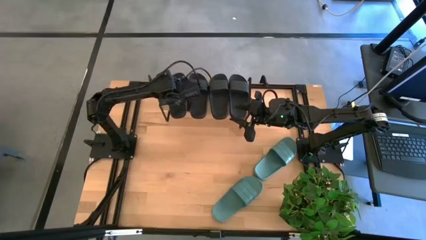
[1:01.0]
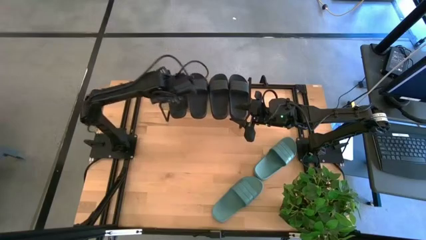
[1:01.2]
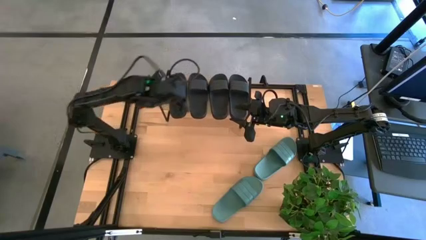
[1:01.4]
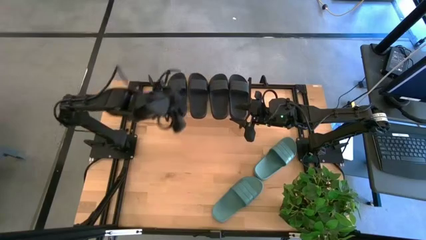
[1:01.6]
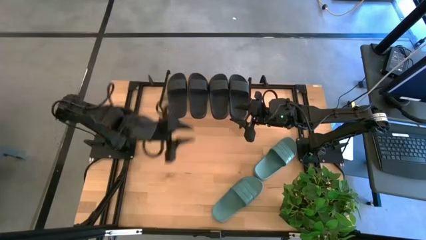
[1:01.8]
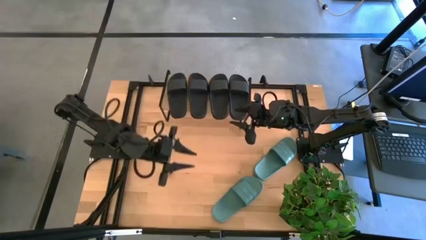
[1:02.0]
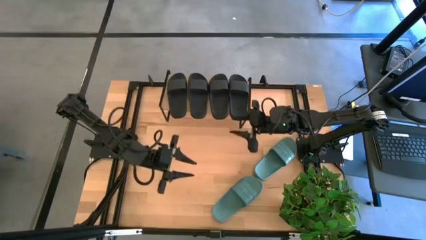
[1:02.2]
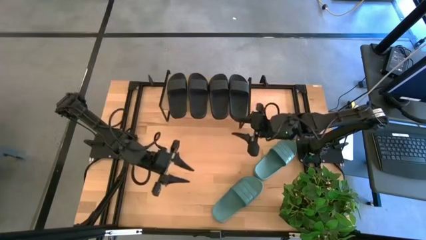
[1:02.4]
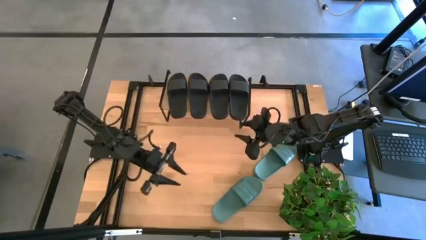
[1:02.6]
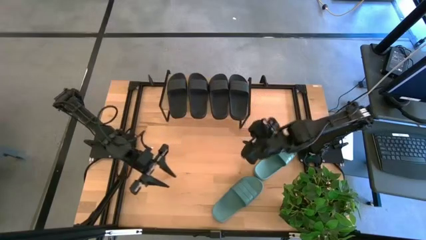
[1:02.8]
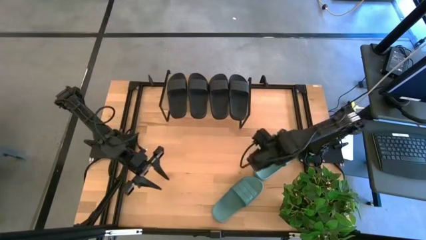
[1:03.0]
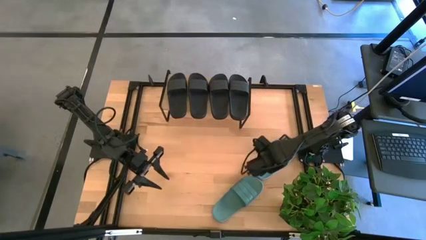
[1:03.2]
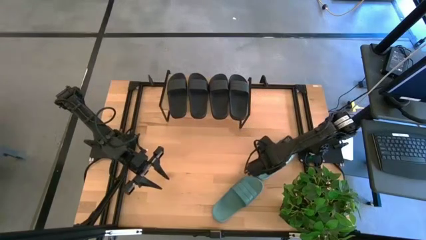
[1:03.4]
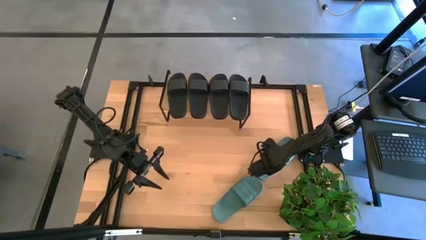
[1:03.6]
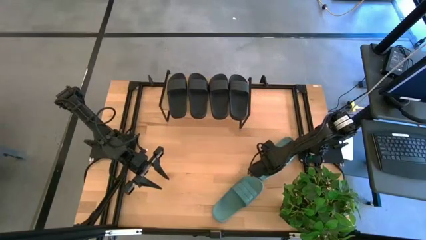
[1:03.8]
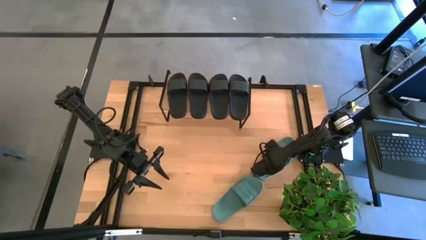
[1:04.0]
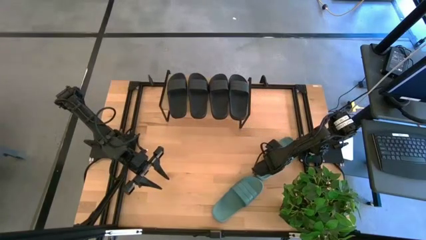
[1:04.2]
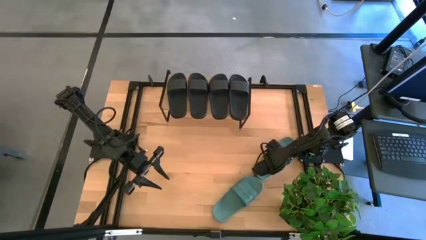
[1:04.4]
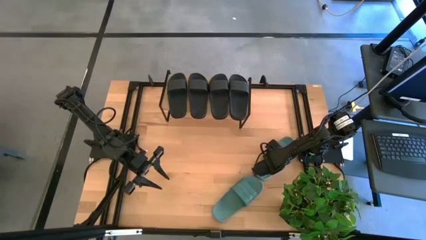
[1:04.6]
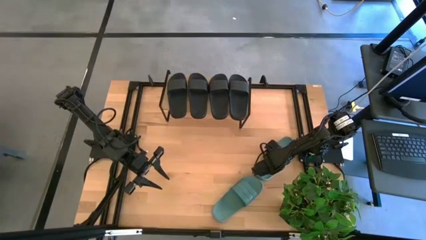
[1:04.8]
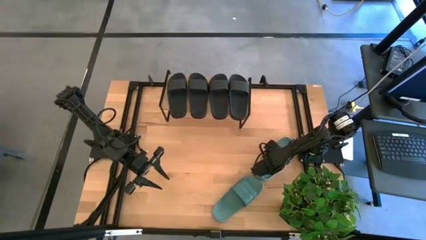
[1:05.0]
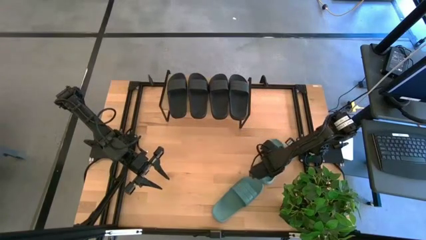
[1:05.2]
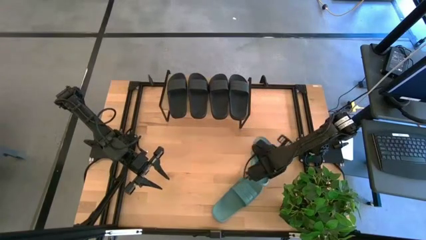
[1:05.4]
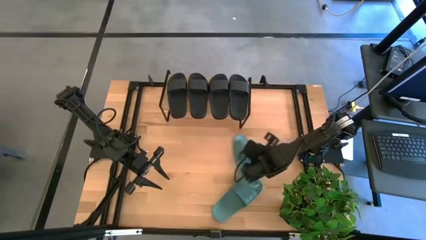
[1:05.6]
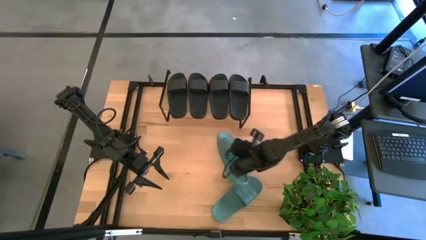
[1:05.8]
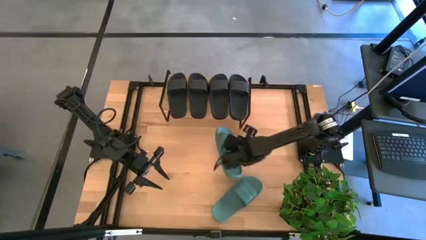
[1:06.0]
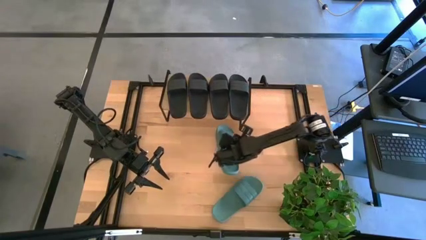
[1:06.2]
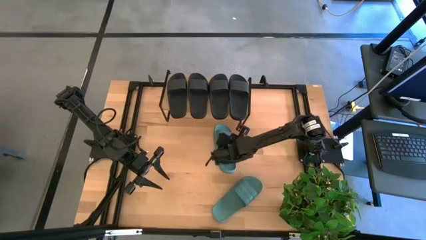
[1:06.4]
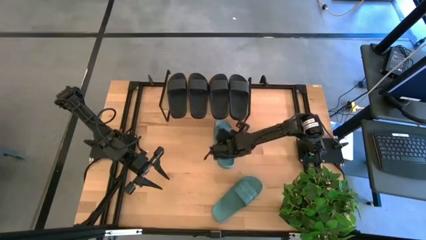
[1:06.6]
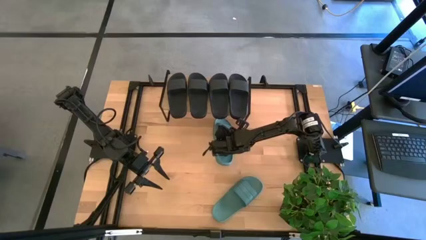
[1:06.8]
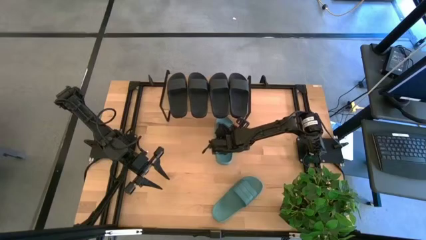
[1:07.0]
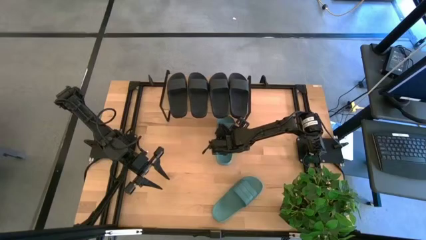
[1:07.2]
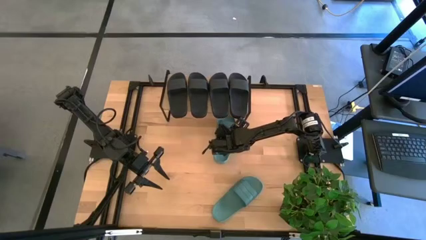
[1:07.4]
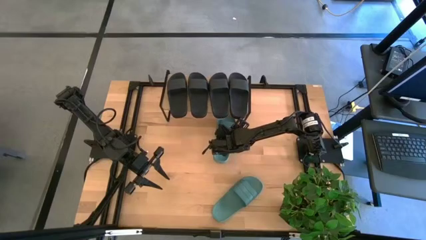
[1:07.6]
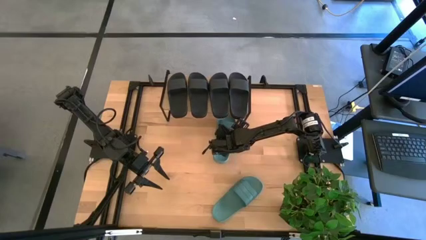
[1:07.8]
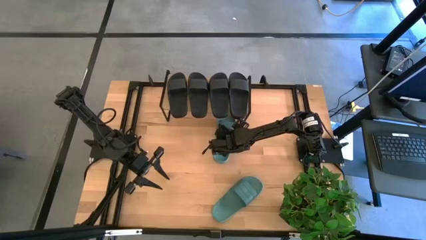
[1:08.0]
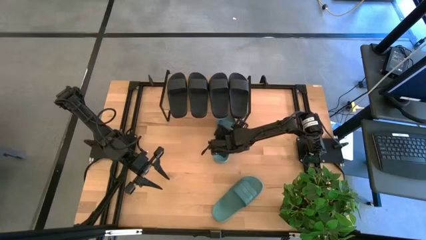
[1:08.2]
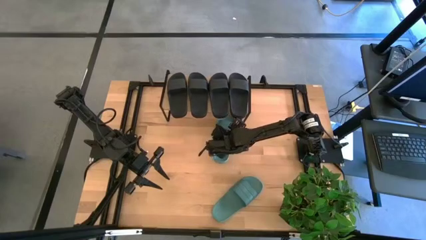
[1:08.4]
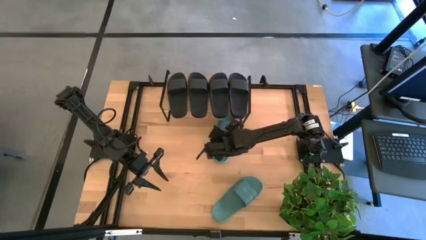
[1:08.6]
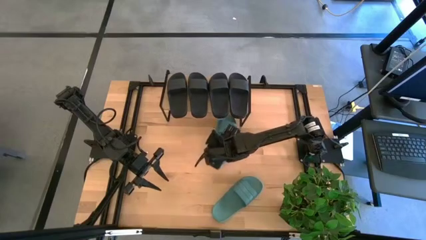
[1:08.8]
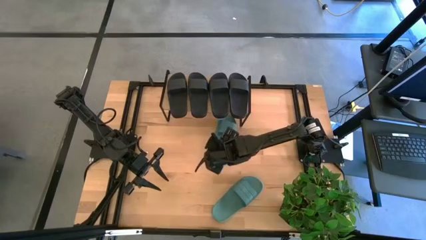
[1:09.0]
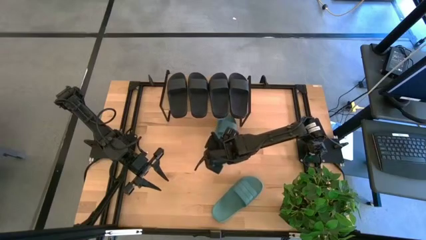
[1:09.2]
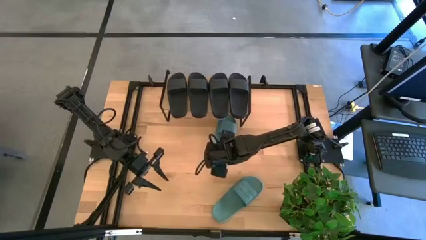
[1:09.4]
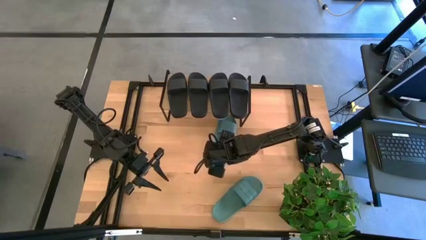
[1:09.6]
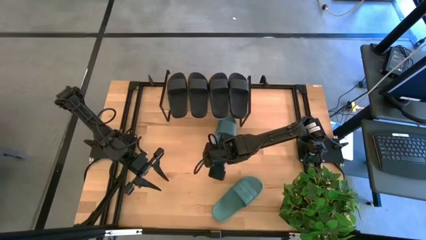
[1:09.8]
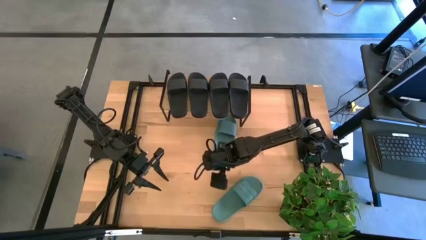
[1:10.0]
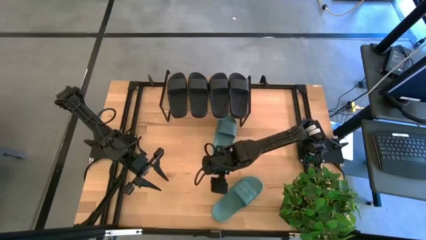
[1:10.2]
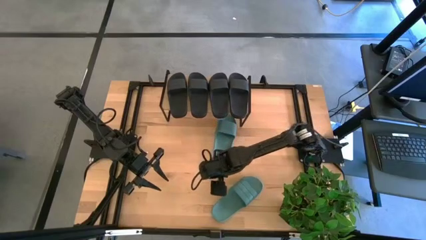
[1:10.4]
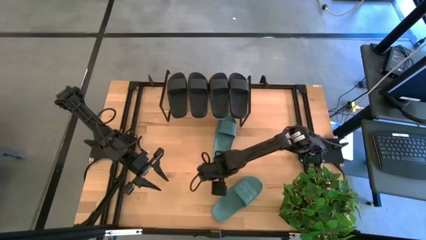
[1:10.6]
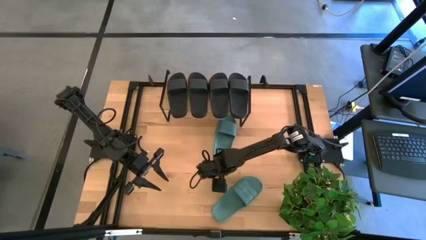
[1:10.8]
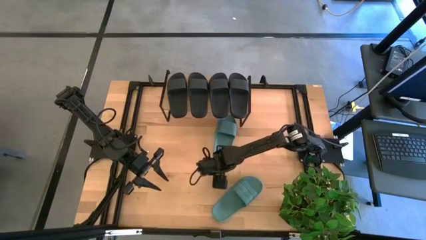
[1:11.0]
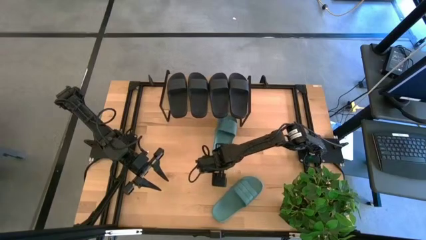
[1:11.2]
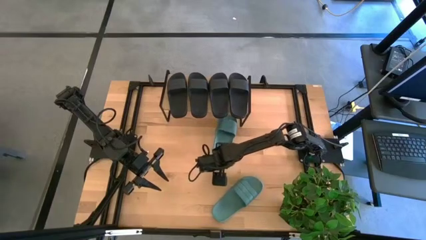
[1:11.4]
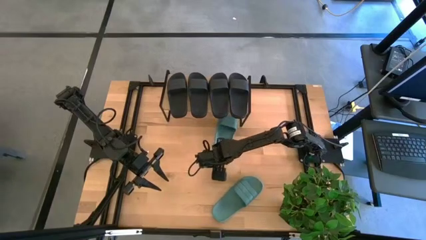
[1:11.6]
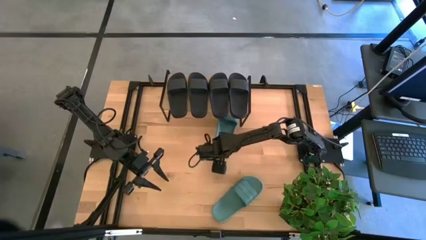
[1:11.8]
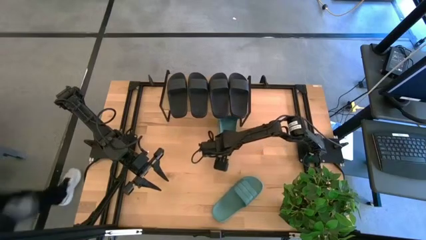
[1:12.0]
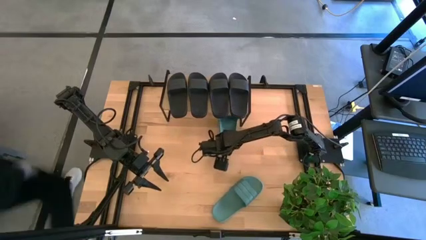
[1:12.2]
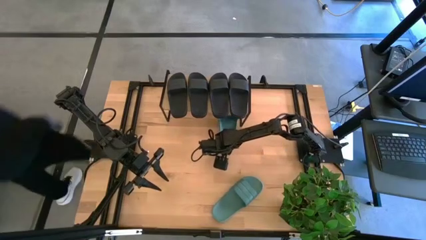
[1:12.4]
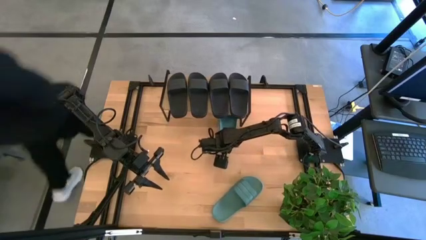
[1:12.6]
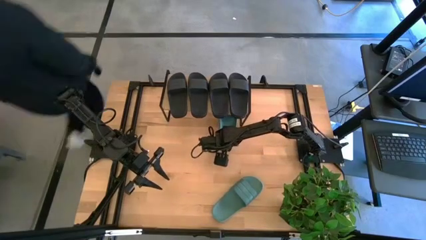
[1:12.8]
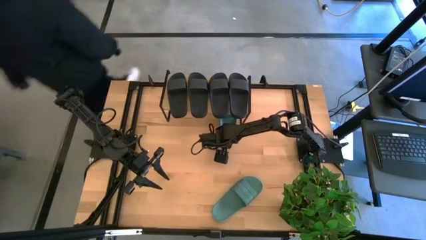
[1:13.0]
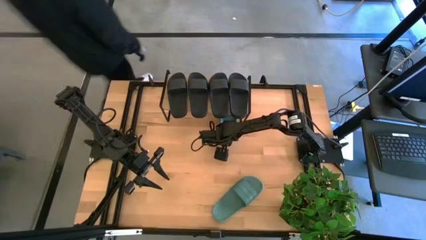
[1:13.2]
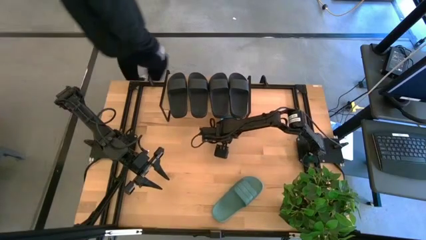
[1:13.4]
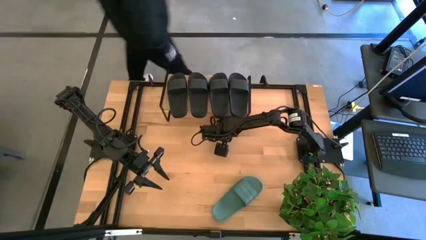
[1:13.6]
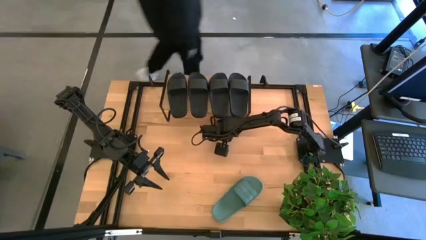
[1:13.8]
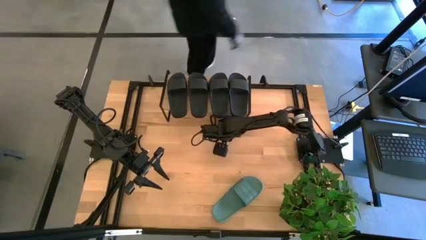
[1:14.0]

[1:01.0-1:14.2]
Task: Pick and place slides into the shelf
Put the green slide under the shelf
